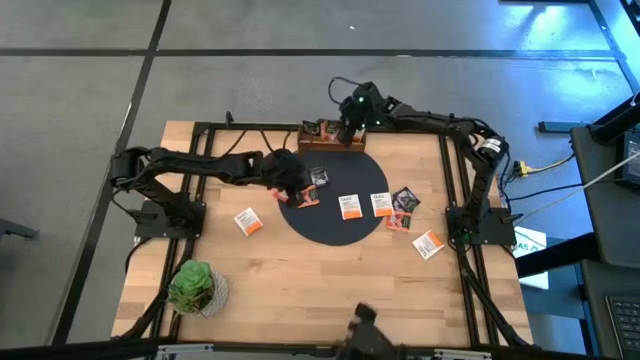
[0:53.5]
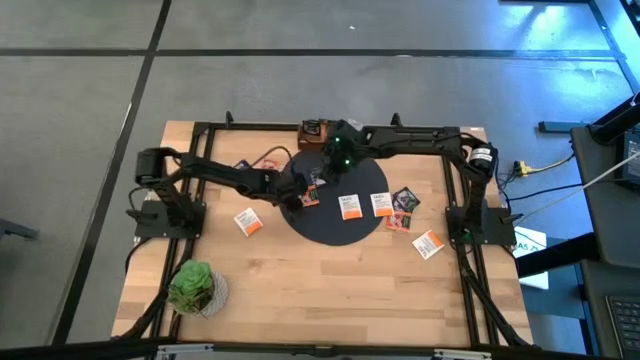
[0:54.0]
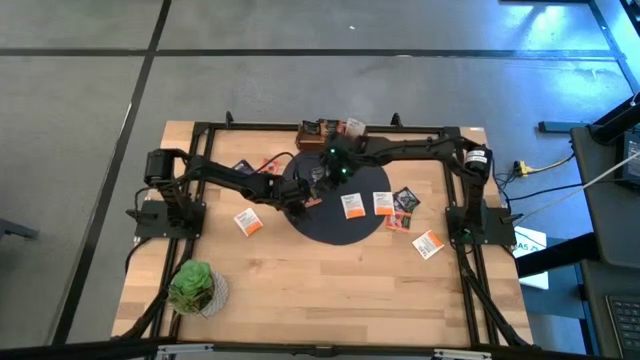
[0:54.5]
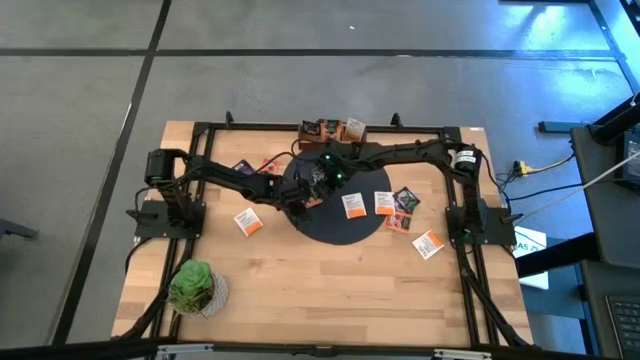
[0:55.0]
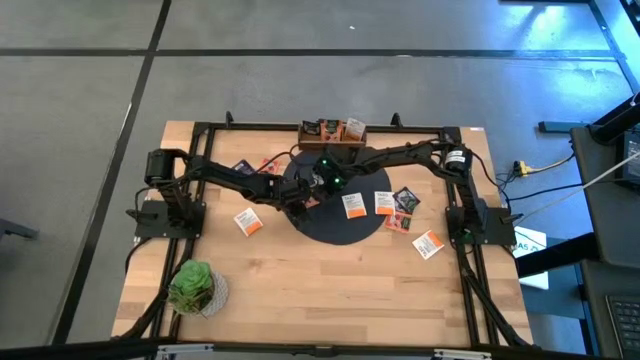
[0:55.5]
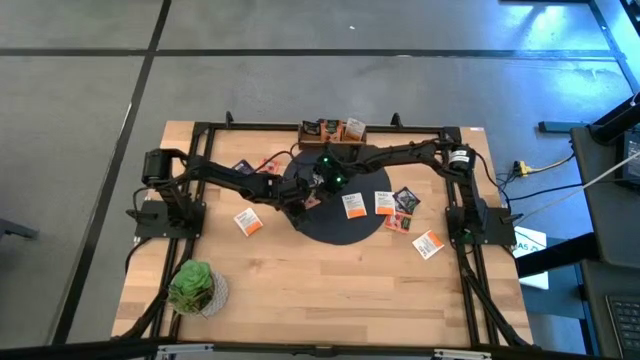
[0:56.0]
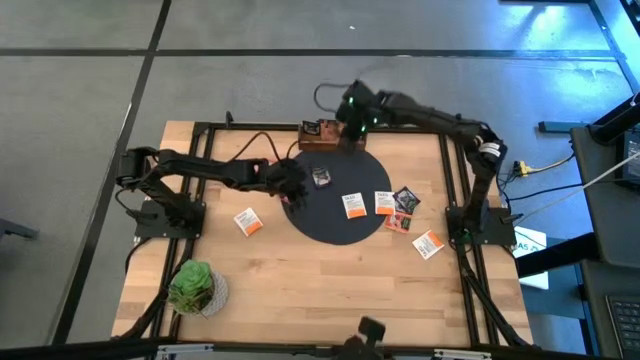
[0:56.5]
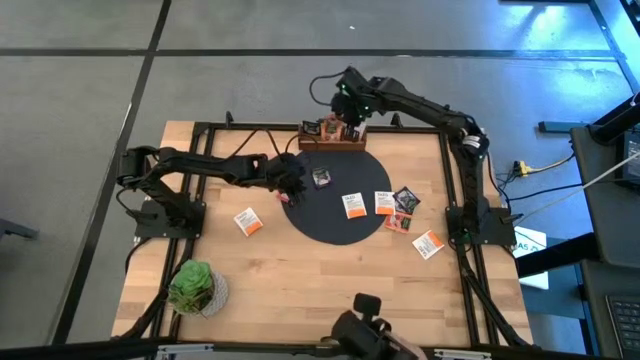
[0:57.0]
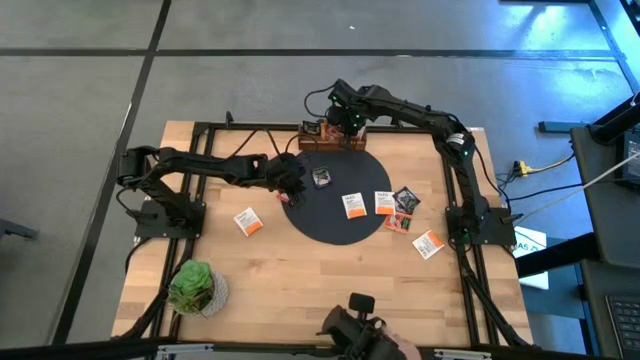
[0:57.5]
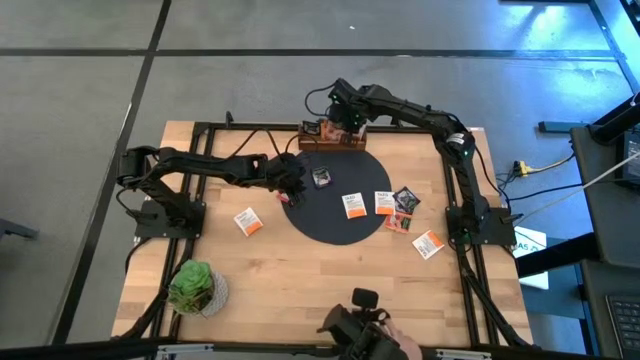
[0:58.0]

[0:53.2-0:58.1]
Task: Pick & Place Tea
Put the orange tea bag into the middle section of the wooden organizer

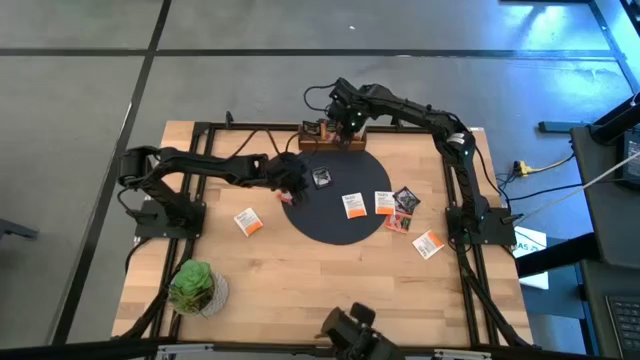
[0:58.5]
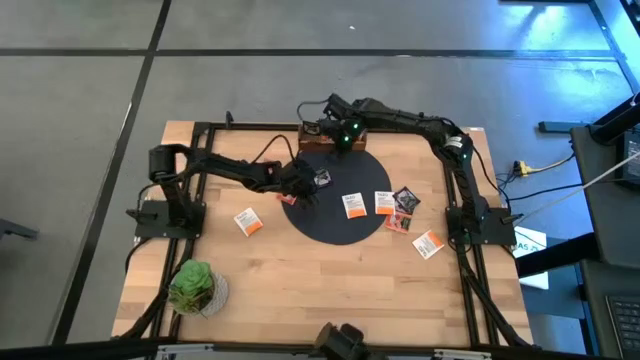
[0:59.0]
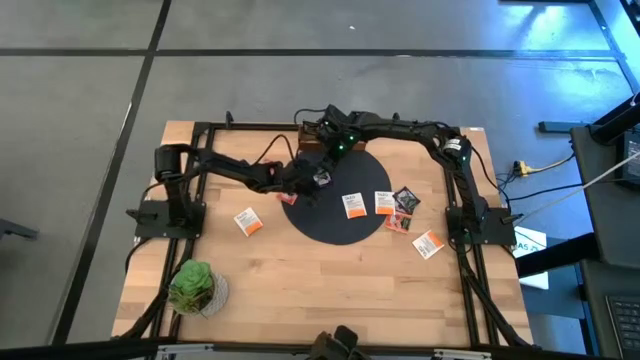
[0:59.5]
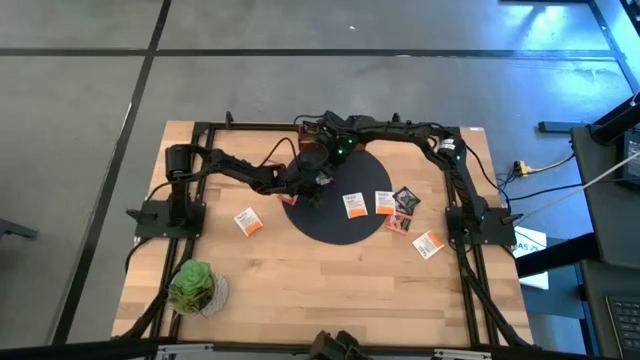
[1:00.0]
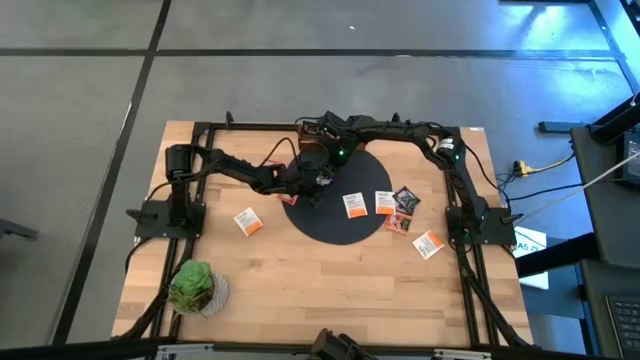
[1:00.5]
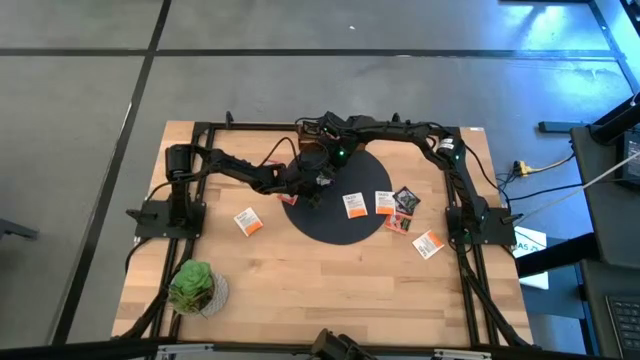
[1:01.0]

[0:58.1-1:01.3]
Put the purple tea bag into the left section of the wooden organizer

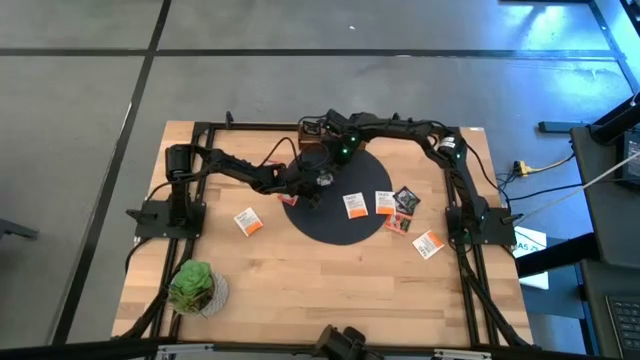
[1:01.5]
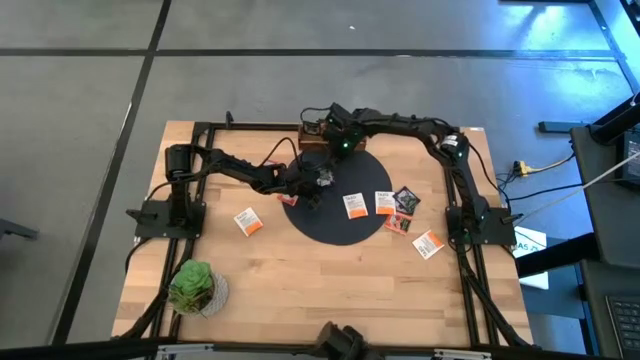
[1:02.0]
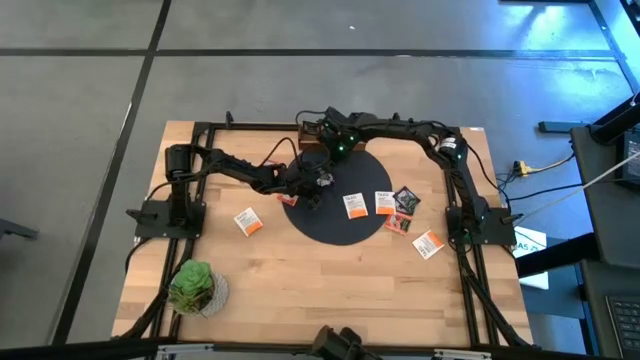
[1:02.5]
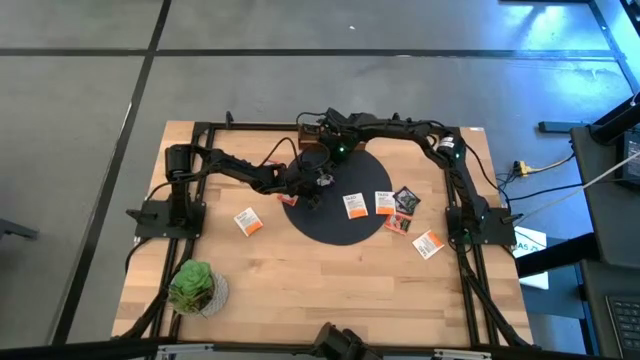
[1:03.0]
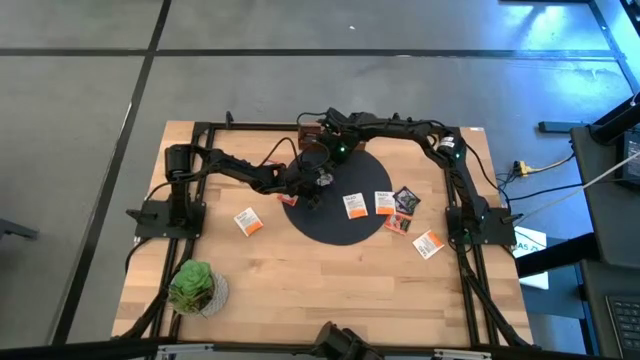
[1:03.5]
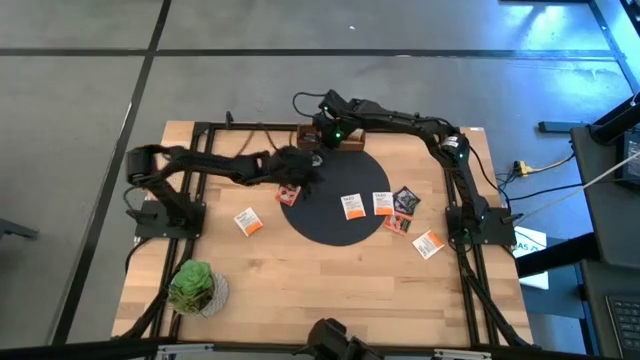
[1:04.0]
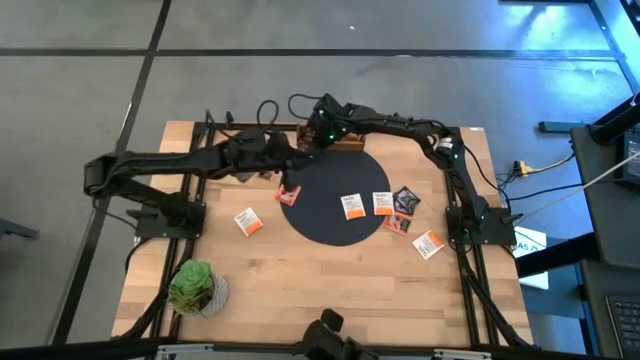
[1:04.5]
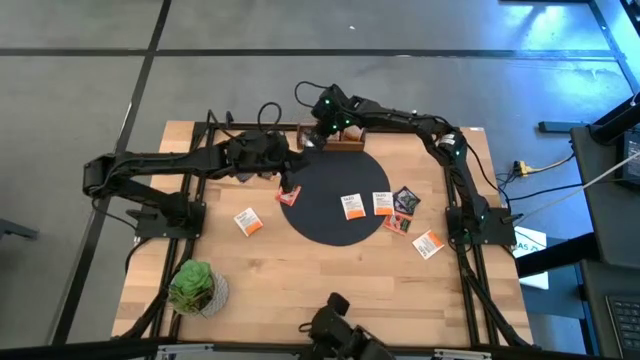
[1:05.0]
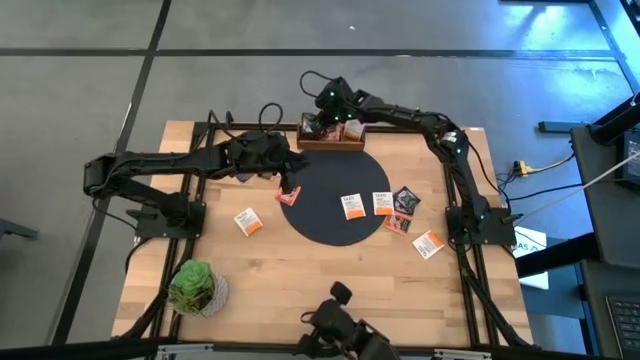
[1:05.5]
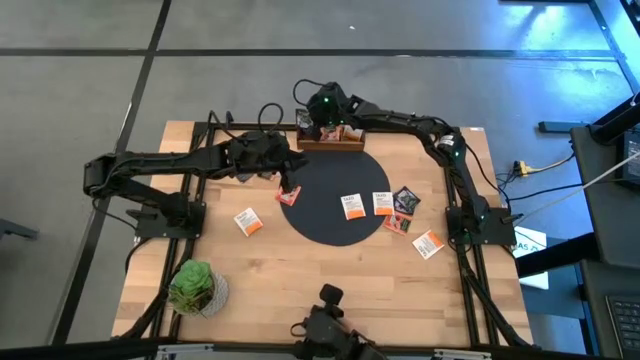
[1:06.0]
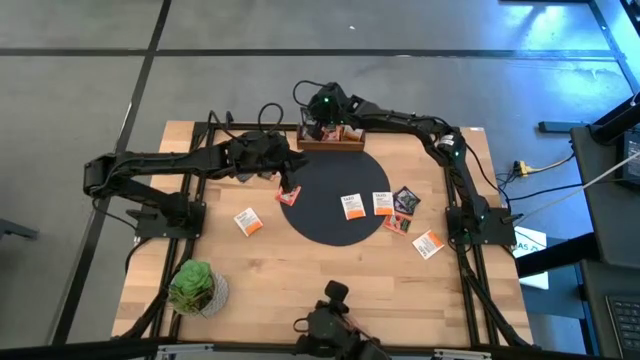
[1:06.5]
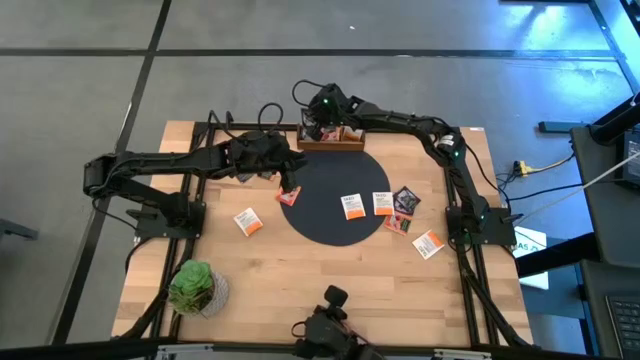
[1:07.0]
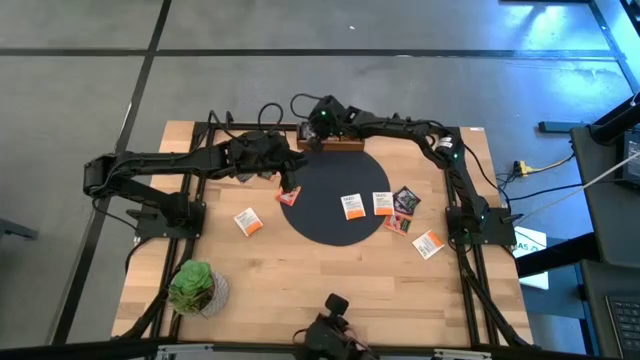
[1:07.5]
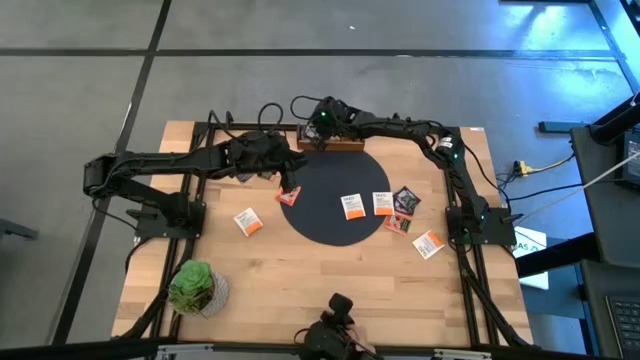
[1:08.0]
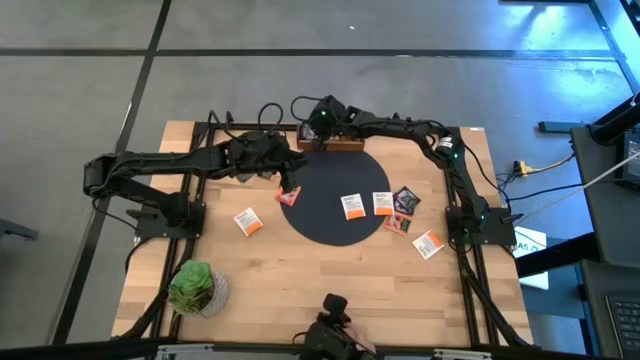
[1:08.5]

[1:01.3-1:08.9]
Put the purple tea bag into the left section of the wooden organizer

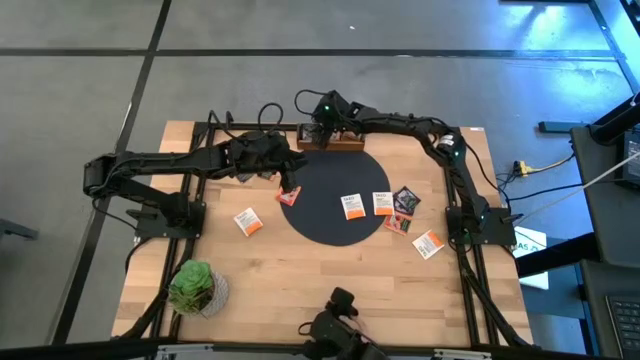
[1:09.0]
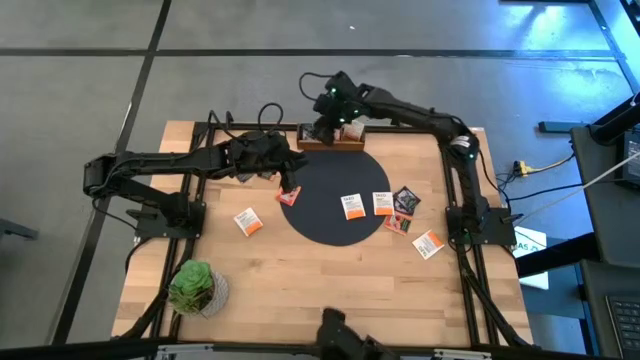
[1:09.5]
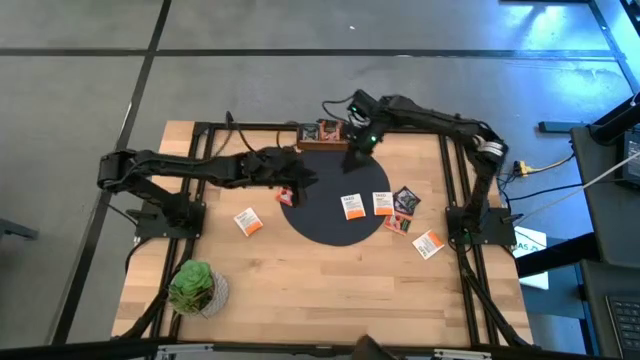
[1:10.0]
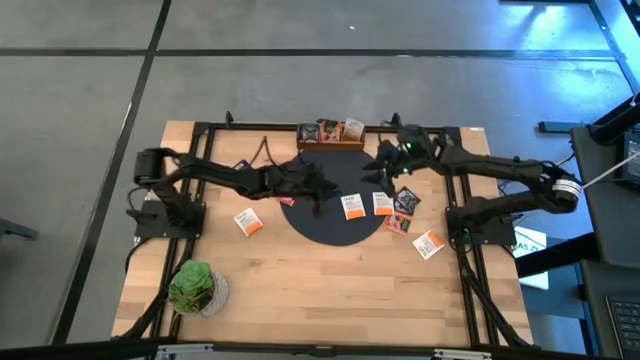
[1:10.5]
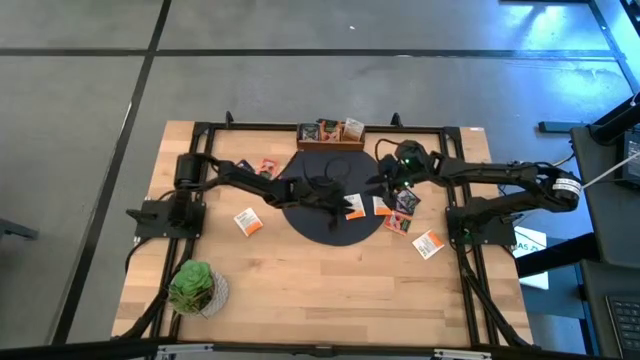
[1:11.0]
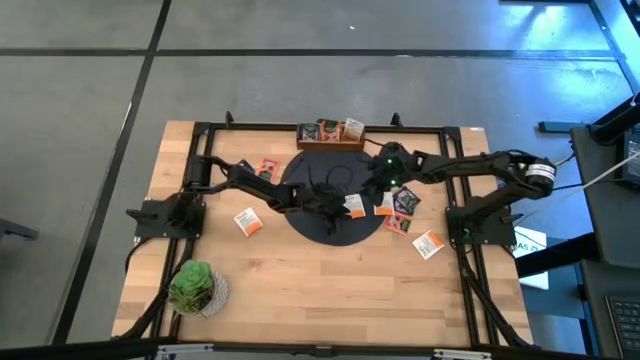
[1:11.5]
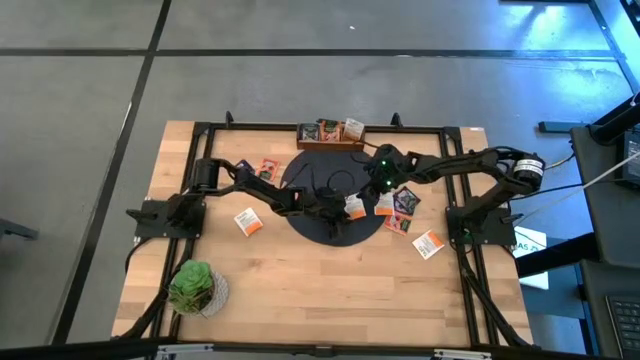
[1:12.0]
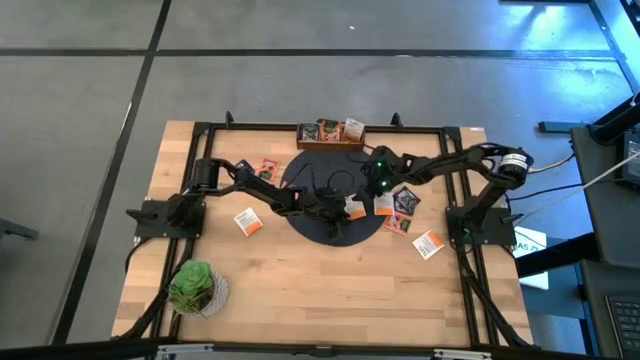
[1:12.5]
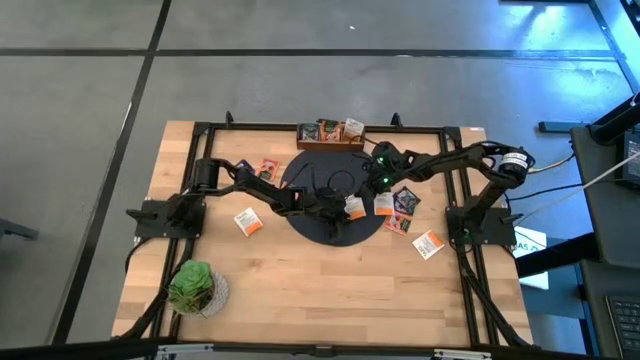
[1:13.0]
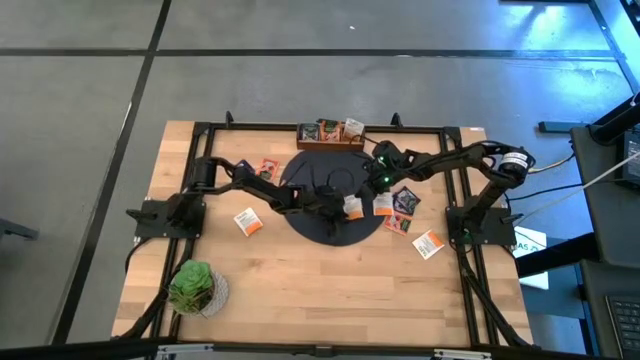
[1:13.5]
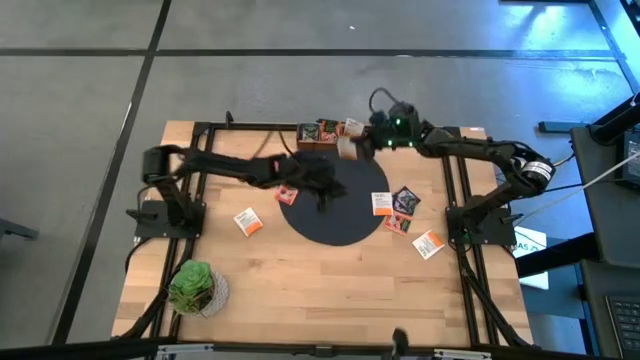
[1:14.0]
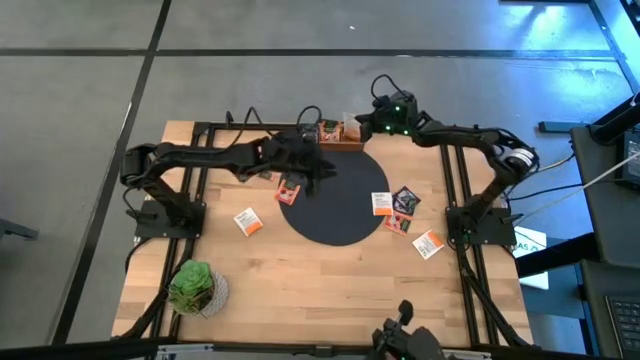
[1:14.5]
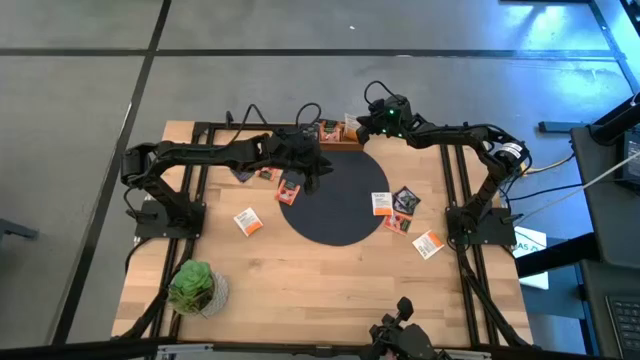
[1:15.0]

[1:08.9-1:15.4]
Put the white tea bag into the right section of the wooden organizer
